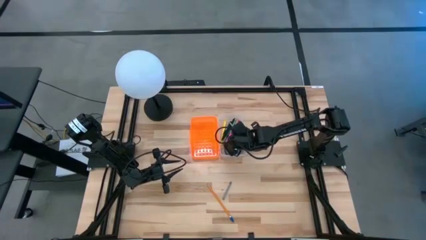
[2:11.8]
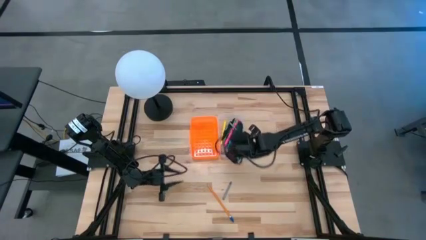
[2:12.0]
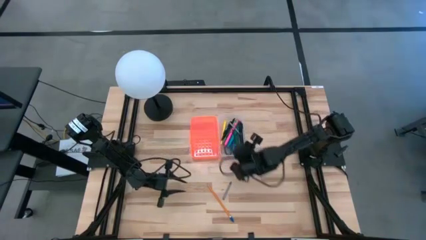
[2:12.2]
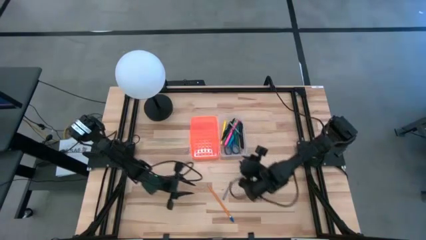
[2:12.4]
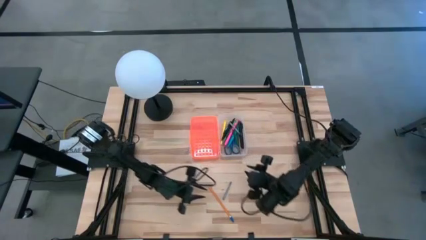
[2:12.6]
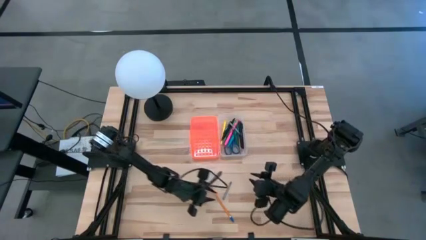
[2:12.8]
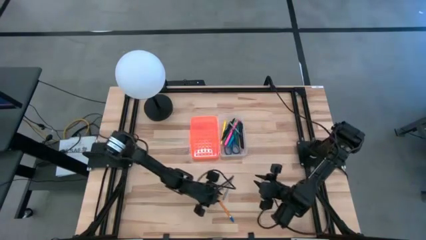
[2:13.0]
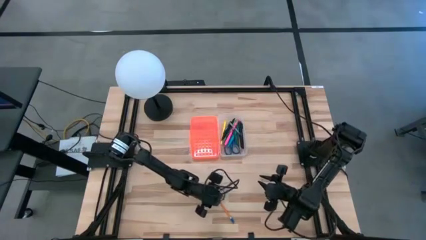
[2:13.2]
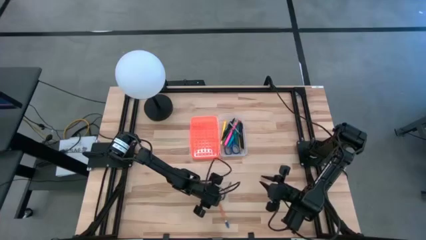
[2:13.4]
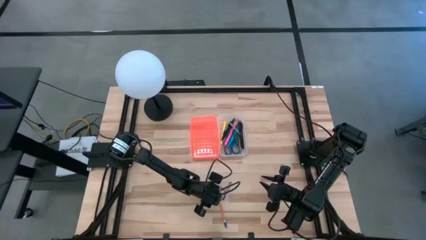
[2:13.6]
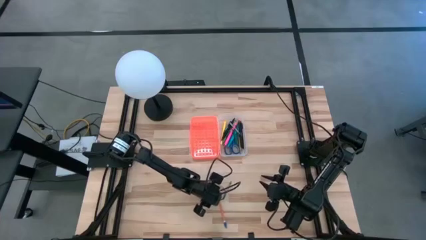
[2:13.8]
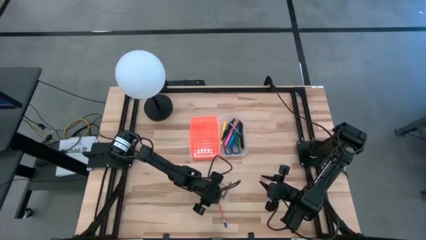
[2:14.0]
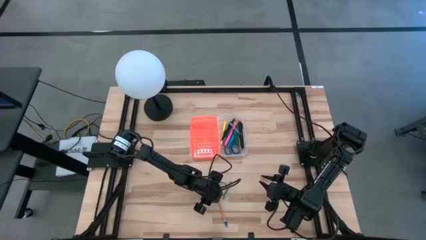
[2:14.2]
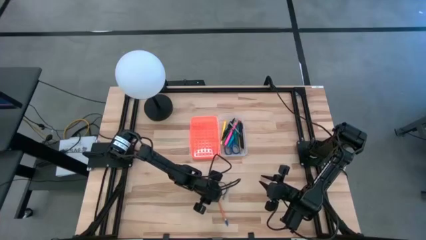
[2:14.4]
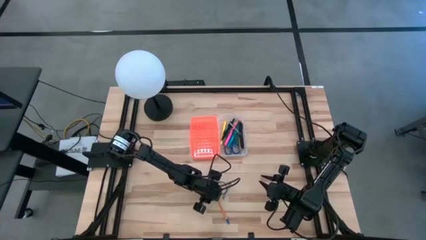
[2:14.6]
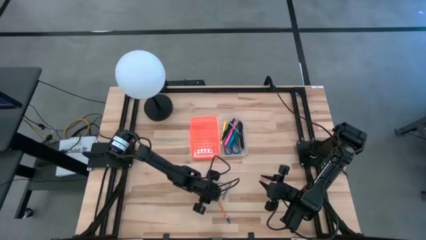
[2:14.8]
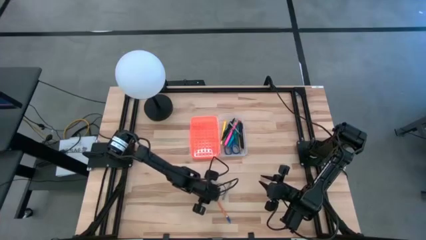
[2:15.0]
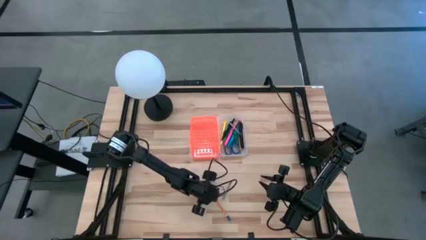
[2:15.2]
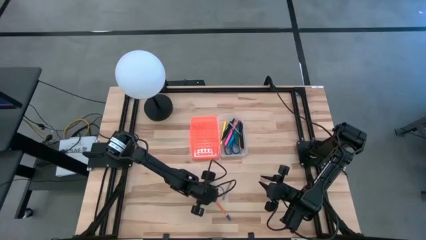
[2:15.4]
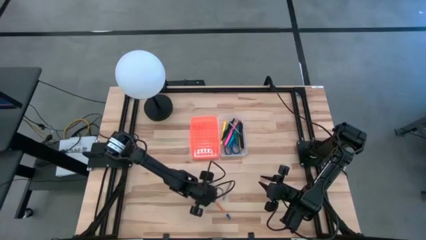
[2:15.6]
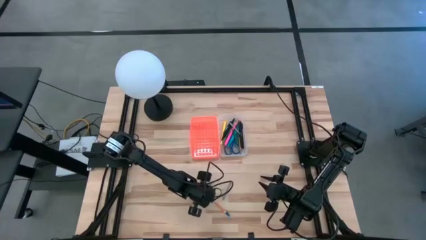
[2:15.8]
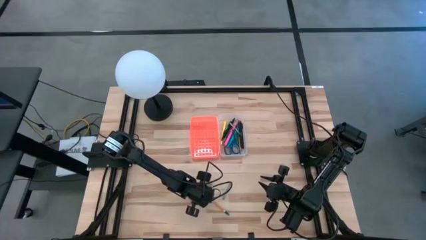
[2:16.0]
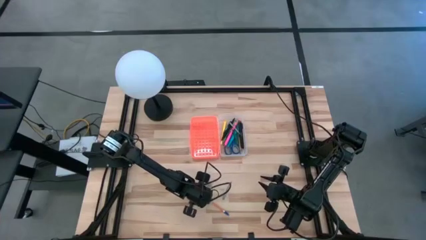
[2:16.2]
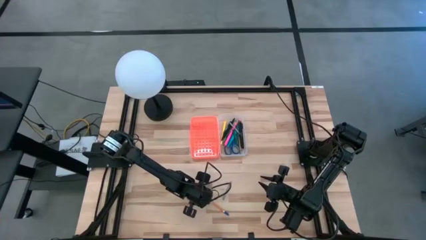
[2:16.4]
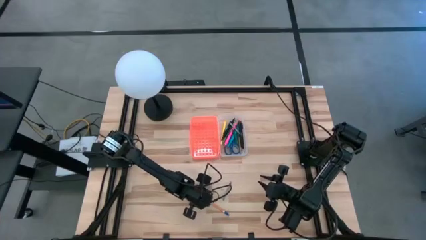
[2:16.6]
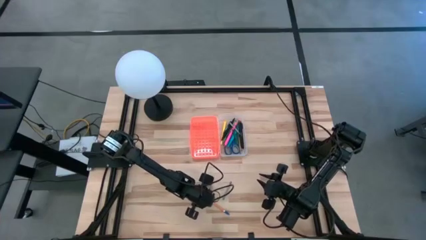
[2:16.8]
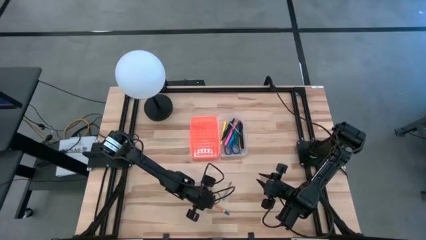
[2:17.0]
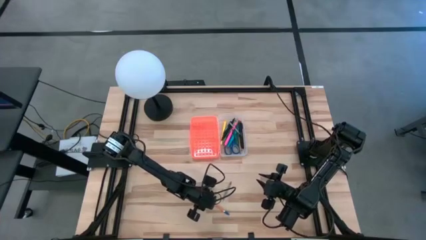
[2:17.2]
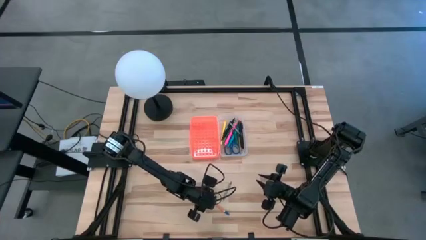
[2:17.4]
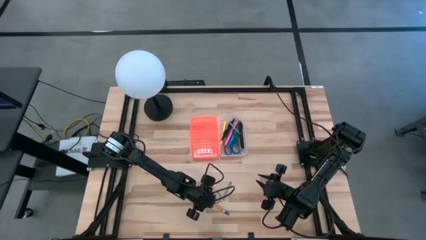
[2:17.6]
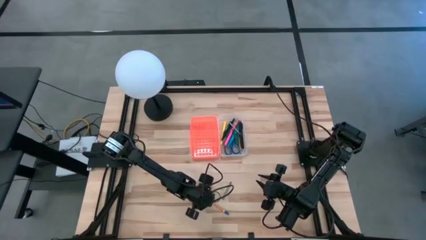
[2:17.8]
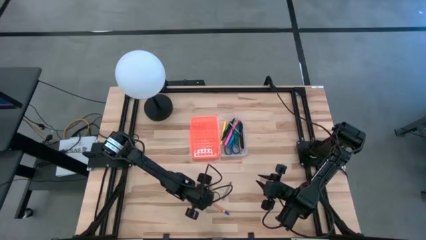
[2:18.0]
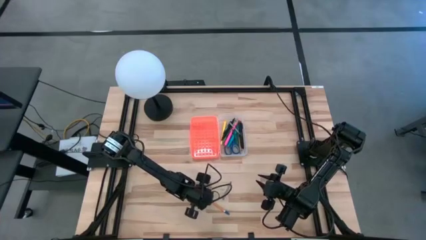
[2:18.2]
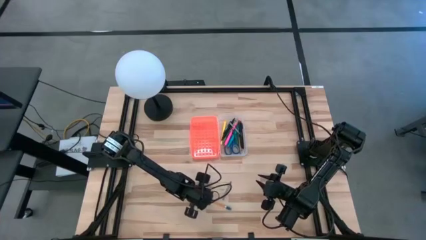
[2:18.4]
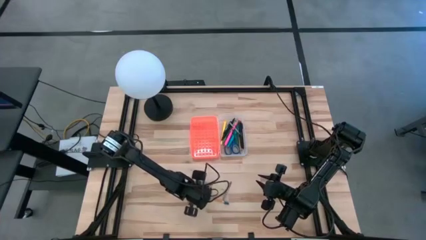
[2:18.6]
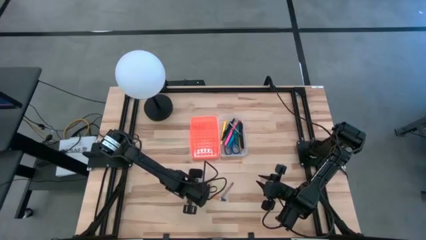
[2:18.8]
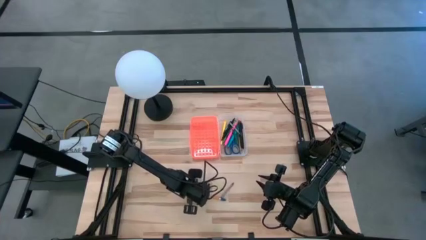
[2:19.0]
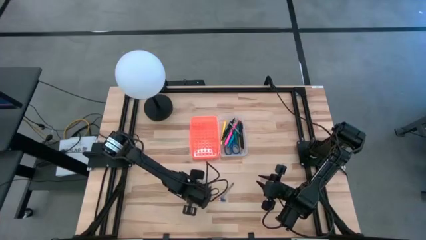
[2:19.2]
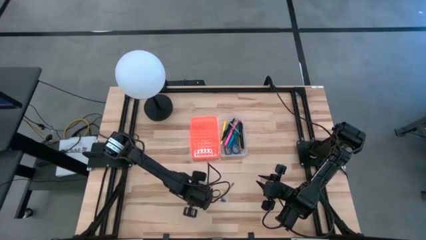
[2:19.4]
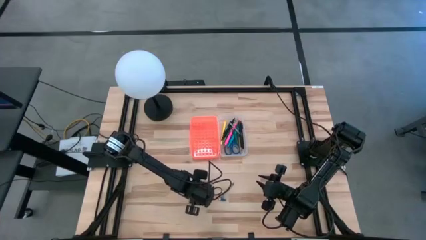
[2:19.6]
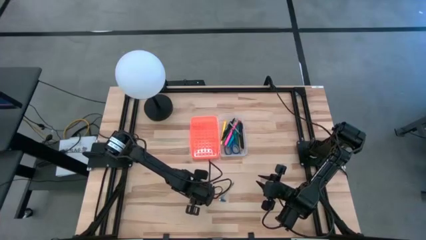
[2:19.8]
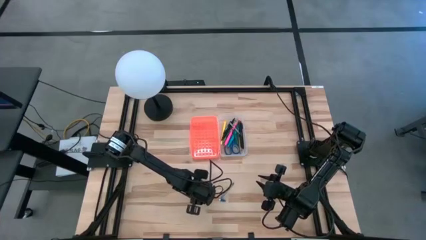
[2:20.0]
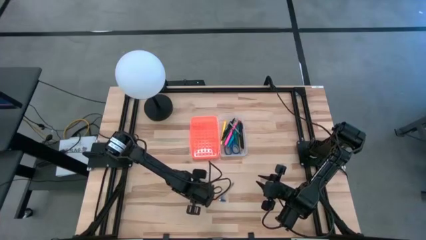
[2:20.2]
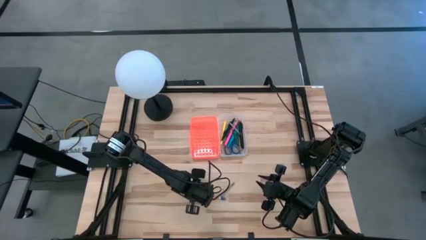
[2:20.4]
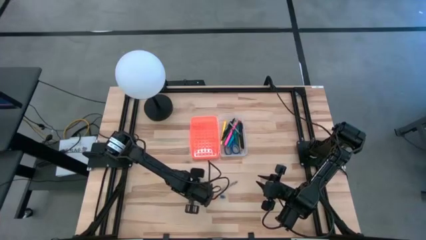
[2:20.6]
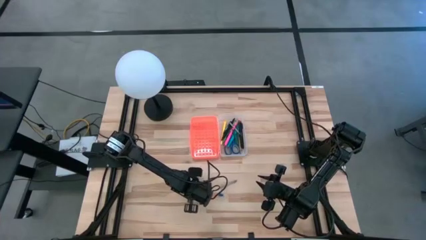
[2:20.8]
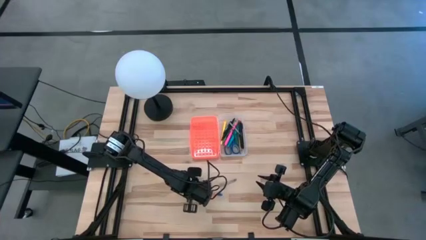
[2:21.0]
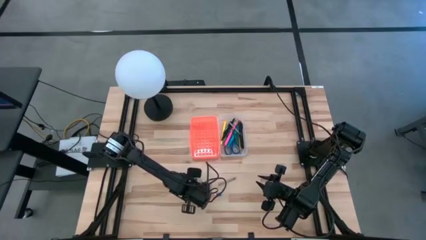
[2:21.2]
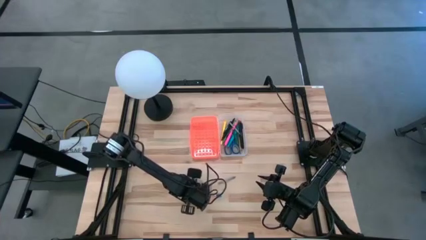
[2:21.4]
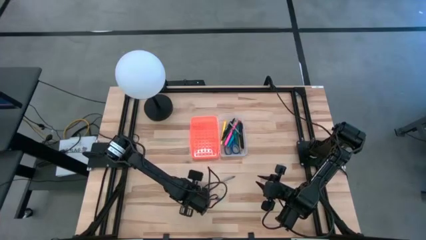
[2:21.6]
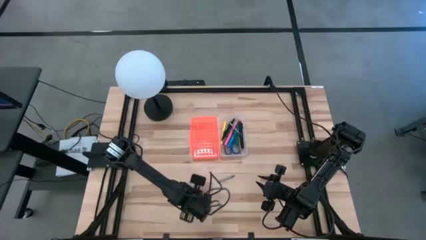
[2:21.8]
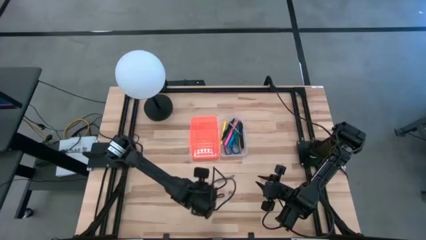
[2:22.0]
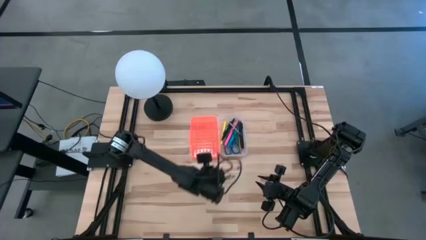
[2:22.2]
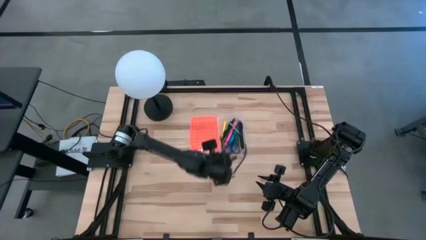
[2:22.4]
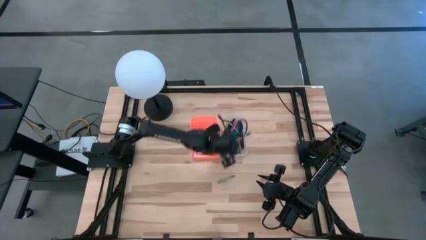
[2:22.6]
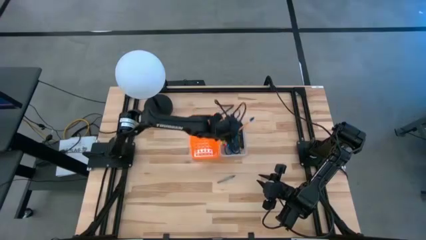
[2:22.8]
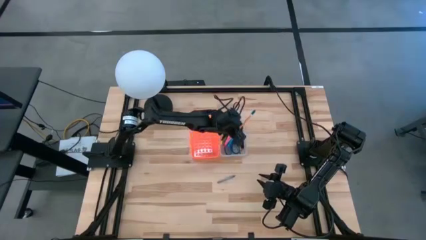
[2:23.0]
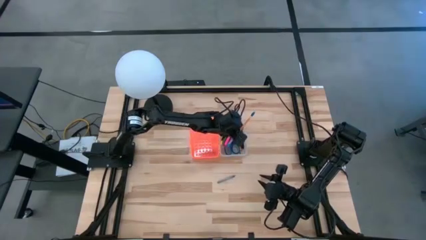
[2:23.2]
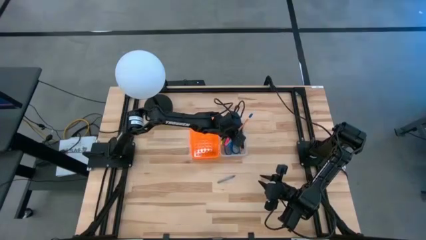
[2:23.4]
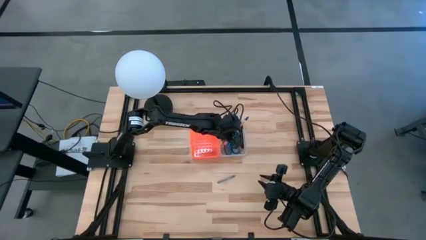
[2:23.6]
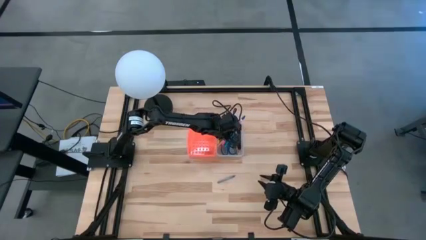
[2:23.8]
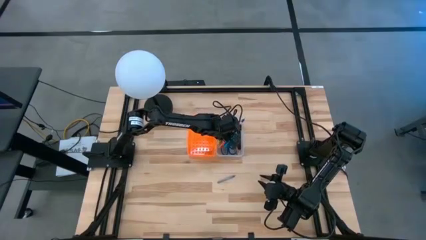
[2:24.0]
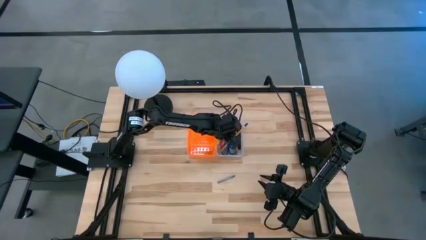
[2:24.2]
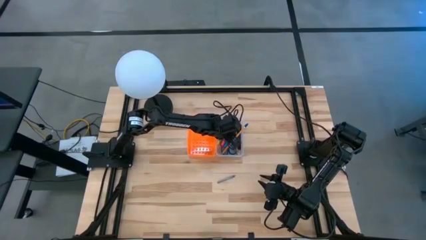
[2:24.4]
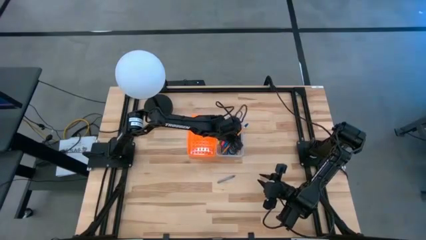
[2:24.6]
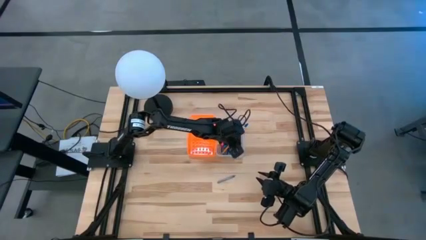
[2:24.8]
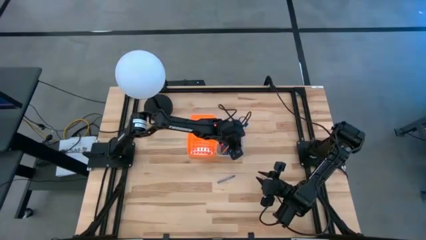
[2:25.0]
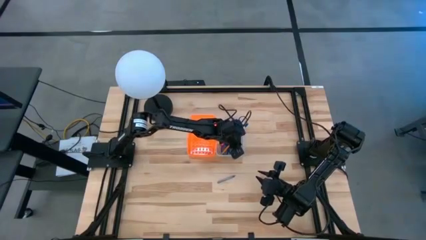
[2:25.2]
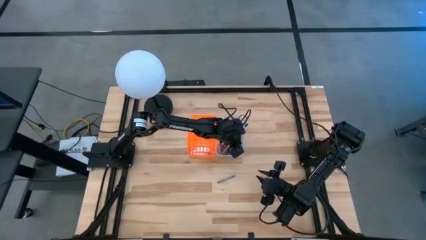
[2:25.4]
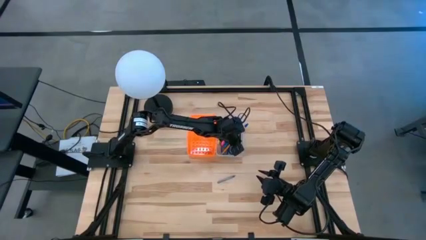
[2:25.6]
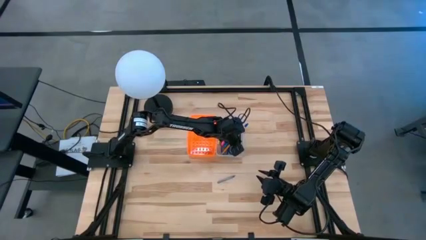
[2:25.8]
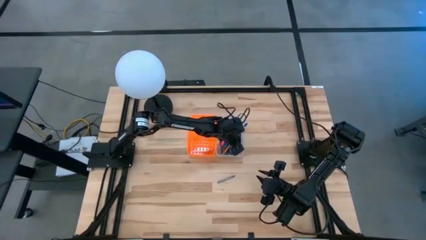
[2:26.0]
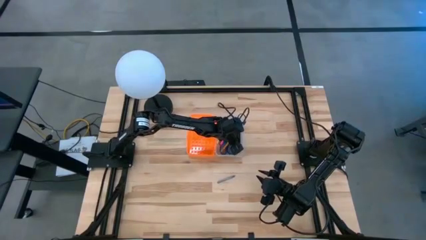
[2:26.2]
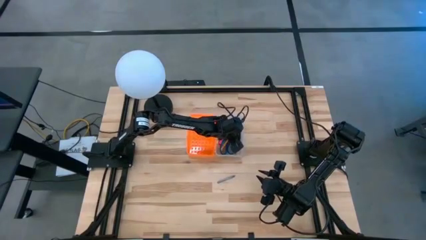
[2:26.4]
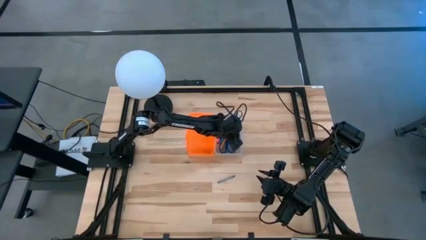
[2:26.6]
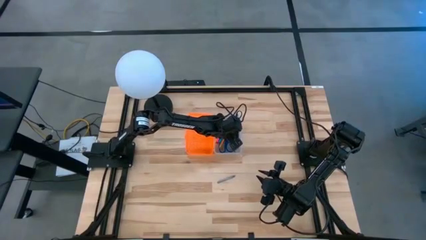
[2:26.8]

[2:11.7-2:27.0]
Task: Pick & place school supplies into a supply box
Put the orange pencil into the orange supply box

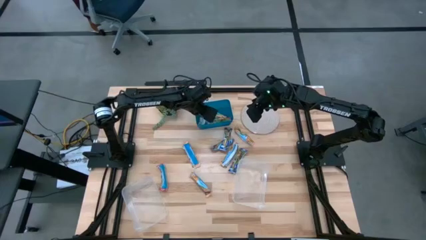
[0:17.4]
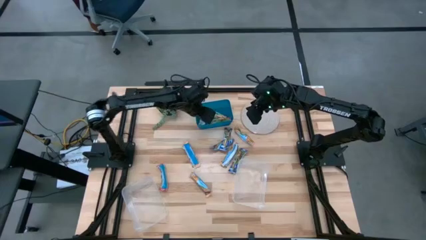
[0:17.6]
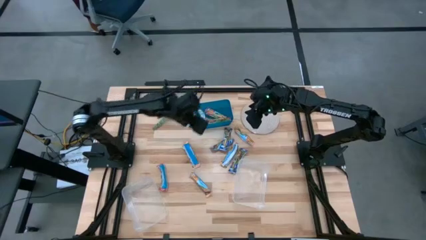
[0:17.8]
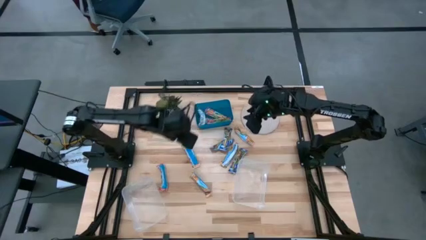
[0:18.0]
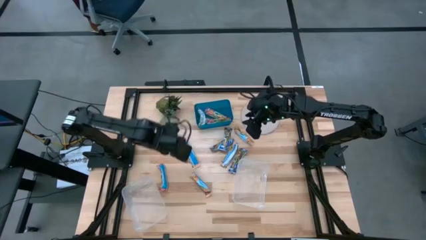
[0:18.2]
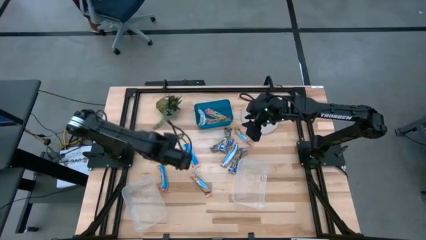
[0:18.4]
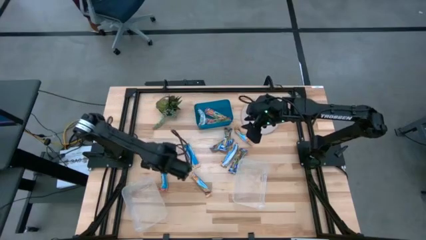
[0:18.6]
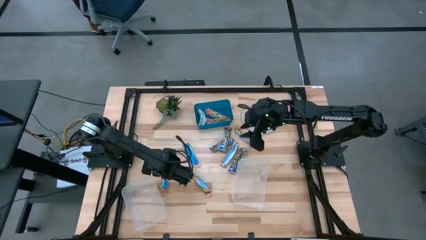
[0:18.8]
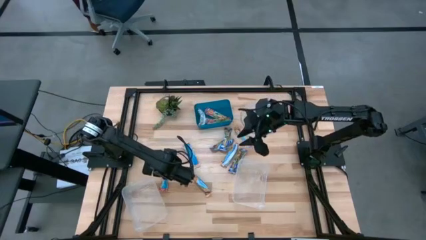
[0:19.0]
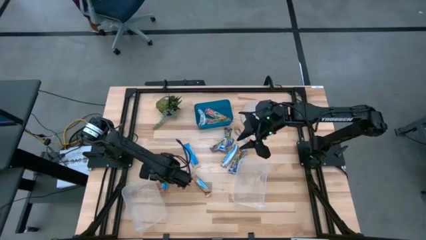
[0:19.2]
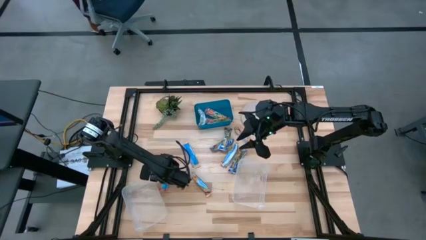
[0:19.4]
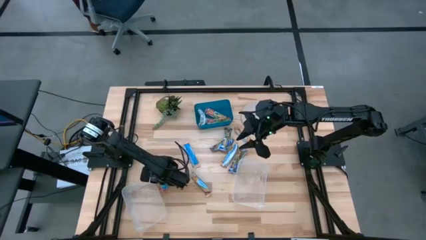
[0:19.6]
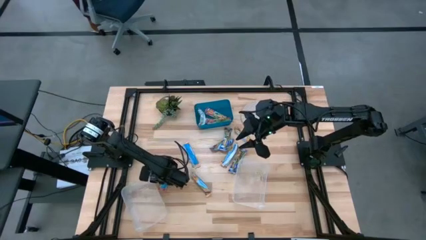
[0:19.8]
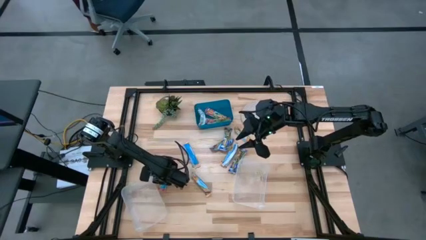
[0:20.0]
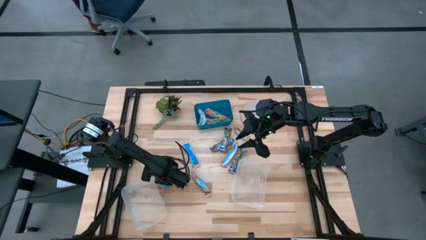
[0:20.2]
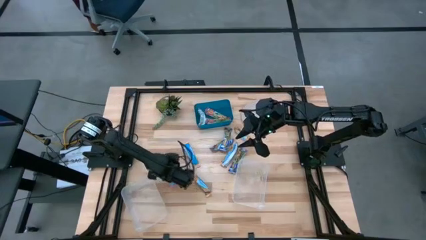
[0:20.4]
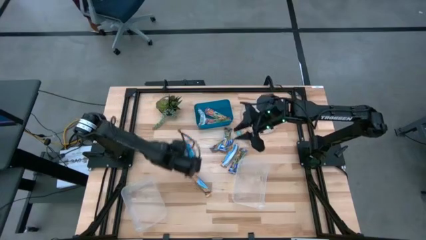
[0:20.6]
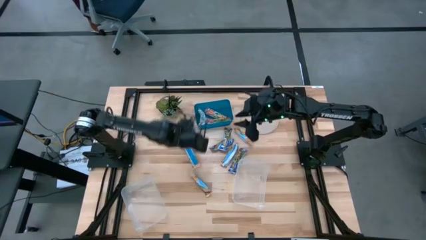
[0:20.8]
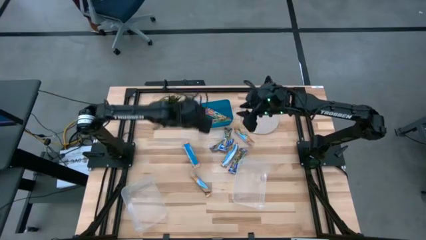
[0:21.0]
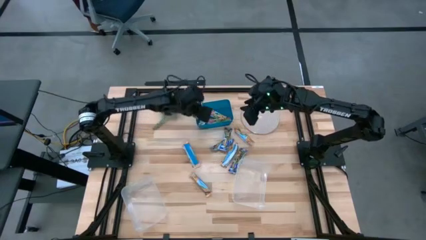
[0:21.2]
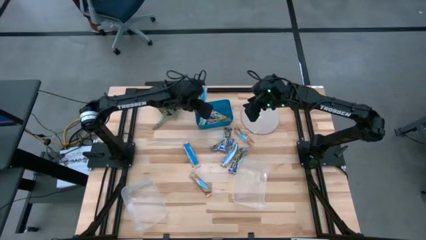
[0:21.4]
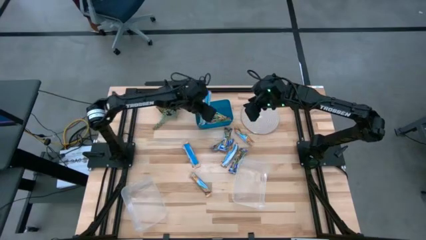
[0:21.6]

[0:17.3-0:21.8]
Task: Pick and place Granola Bars by type
Put the red granola bar into the blue bin
